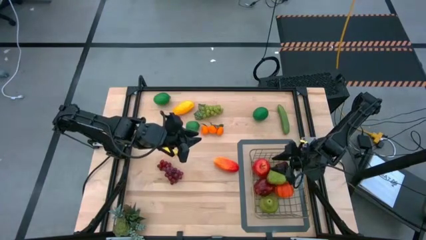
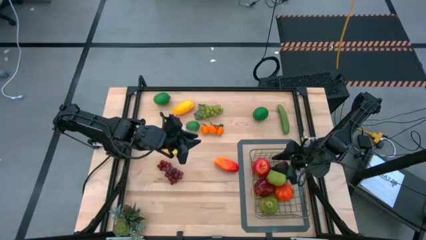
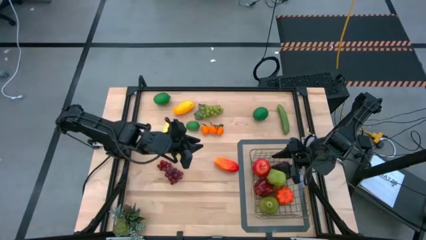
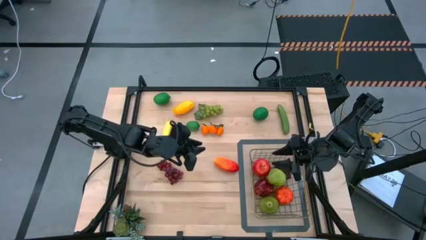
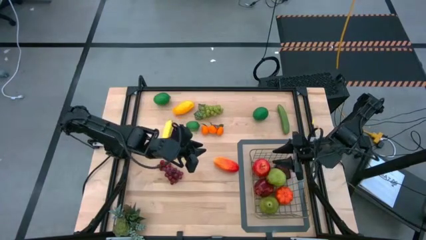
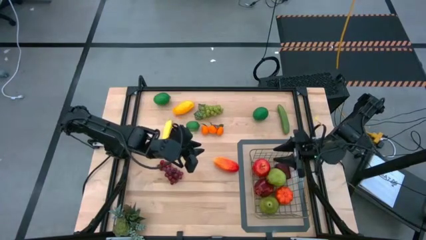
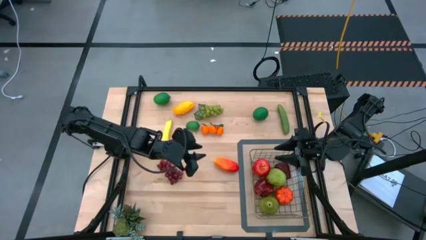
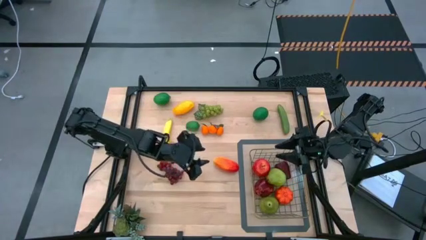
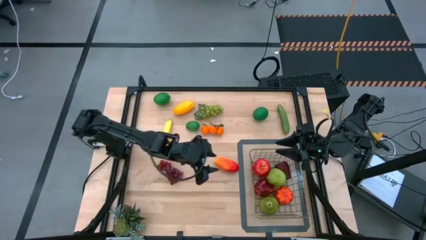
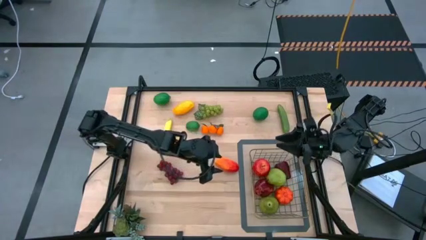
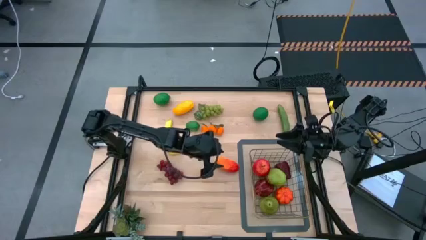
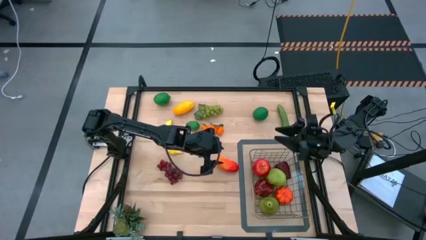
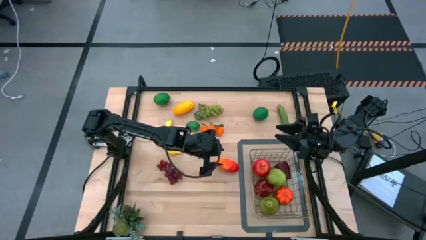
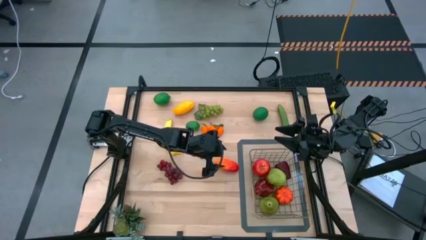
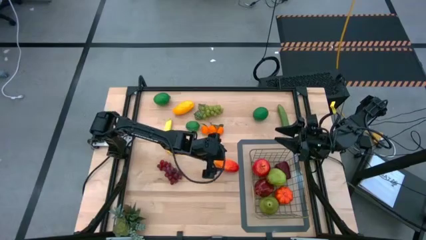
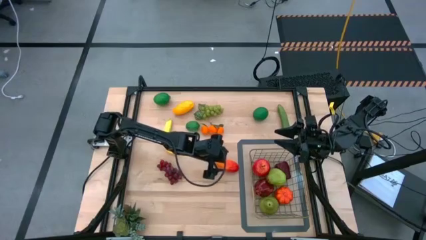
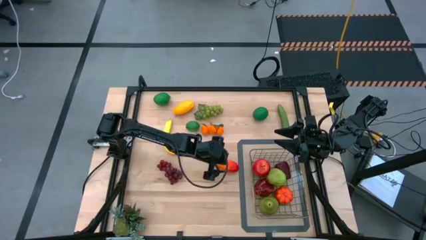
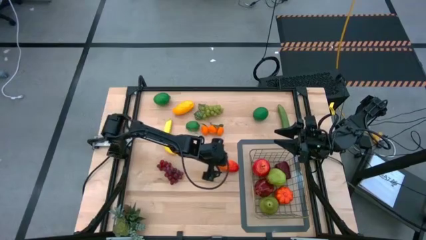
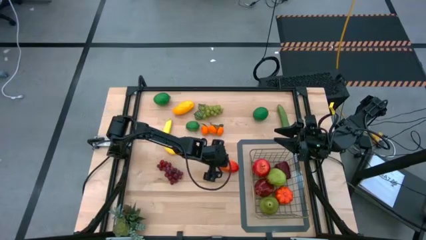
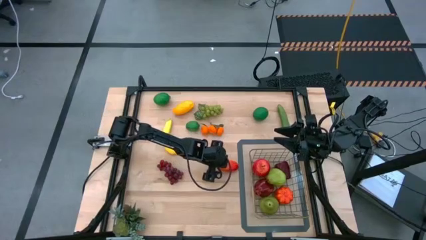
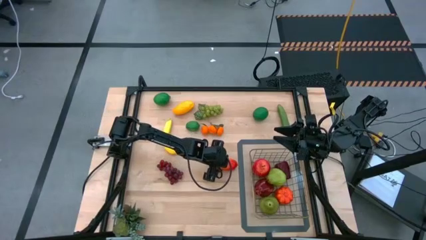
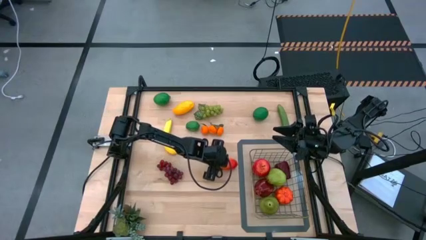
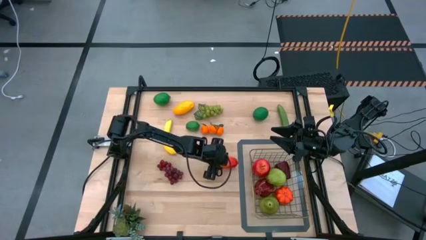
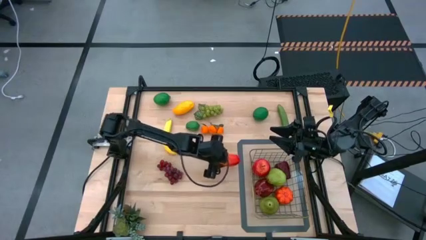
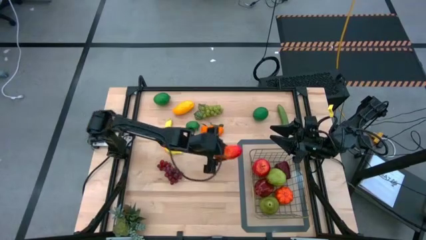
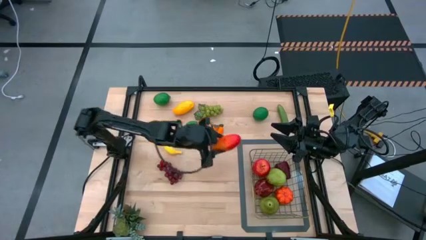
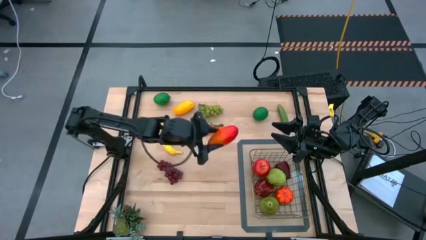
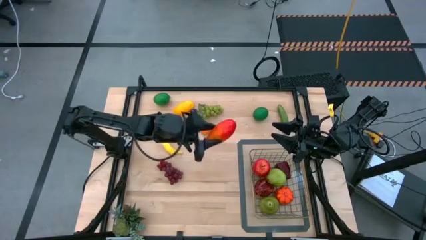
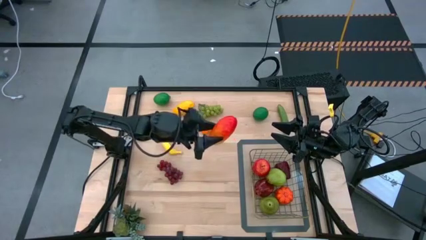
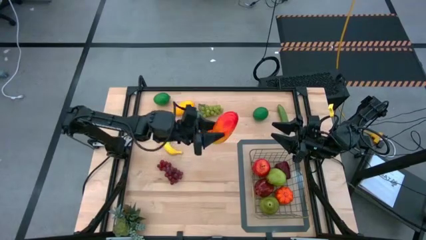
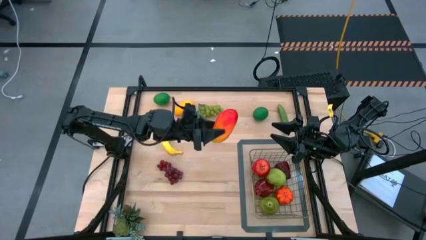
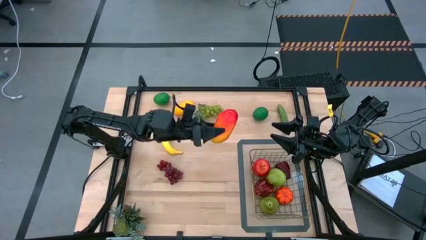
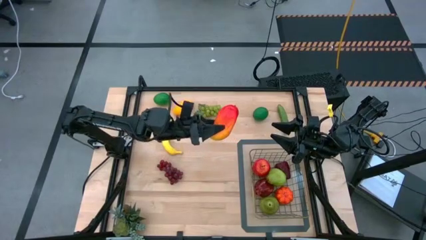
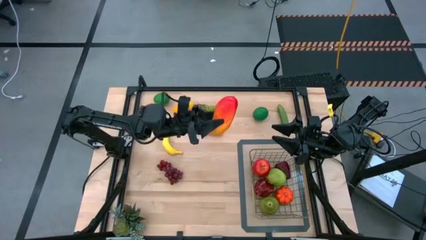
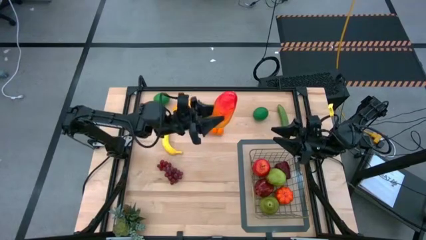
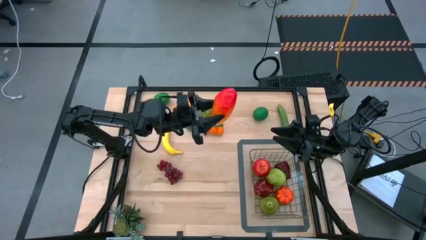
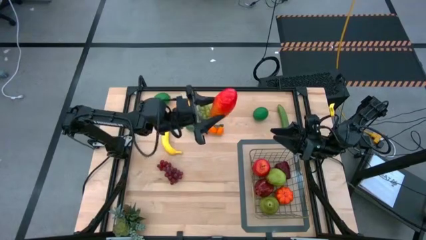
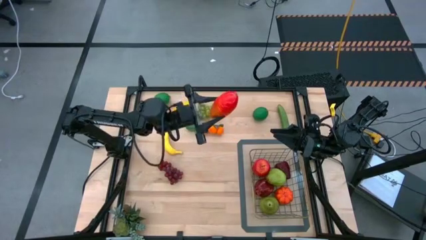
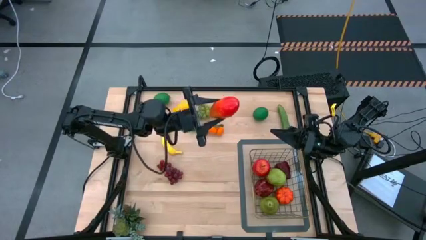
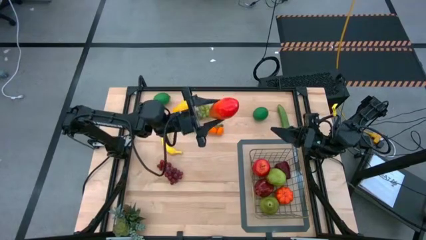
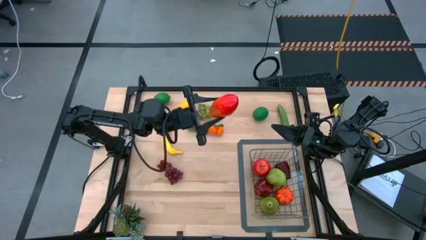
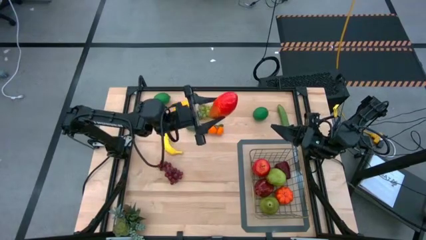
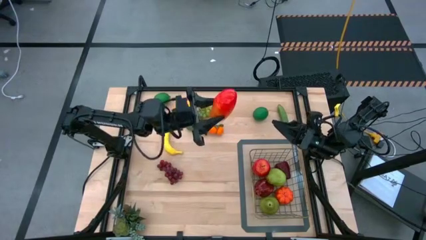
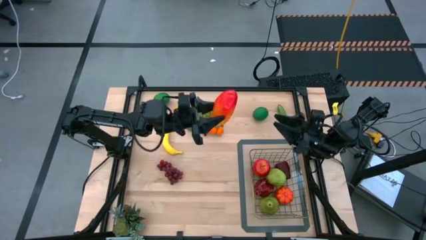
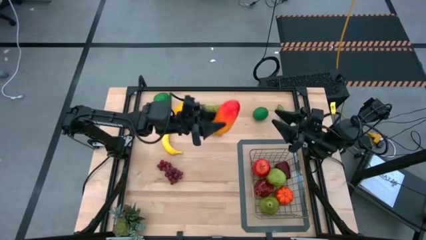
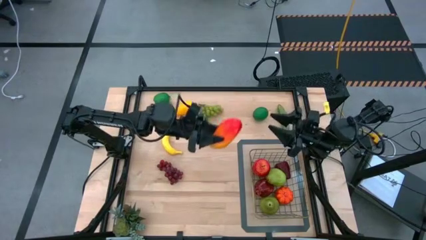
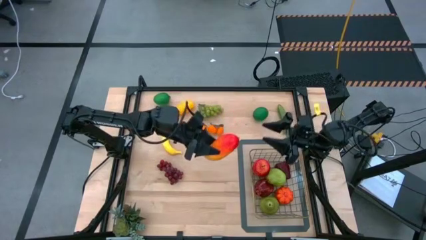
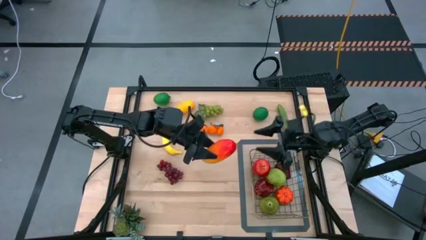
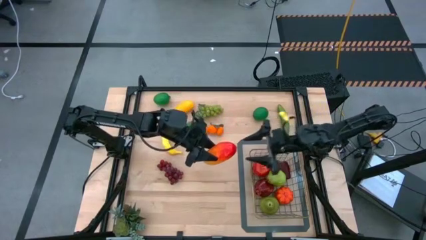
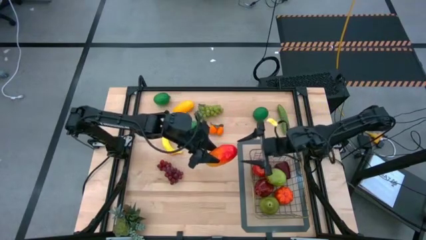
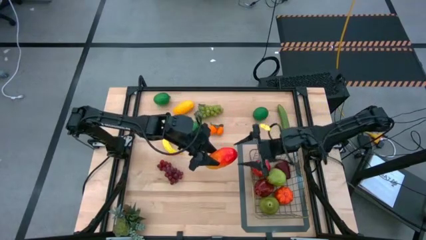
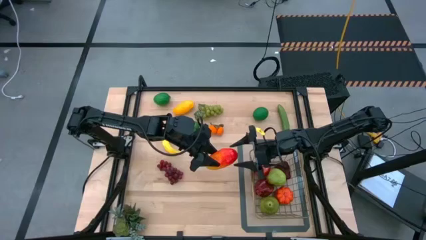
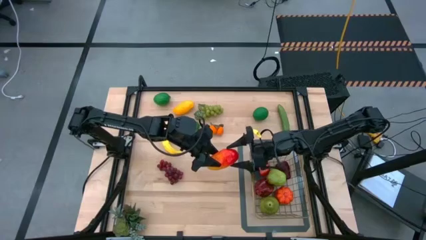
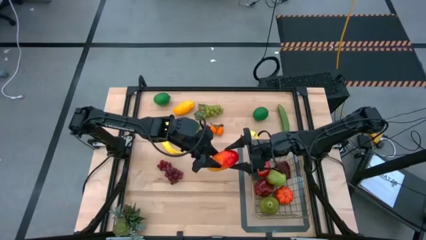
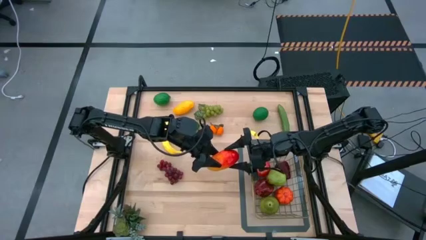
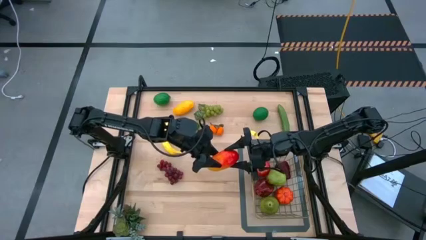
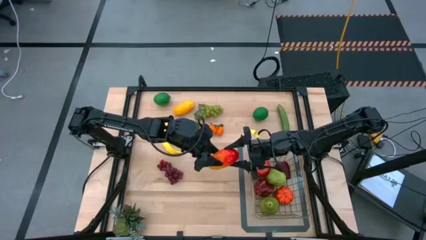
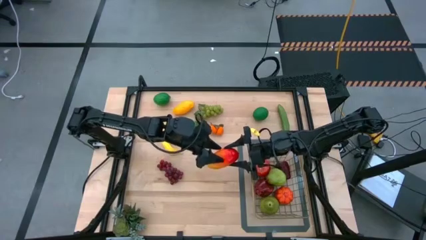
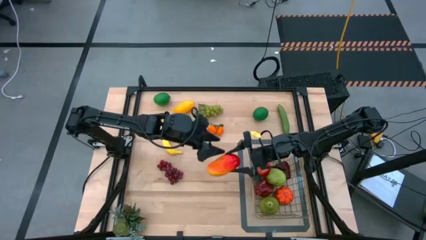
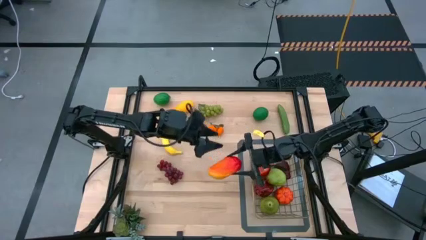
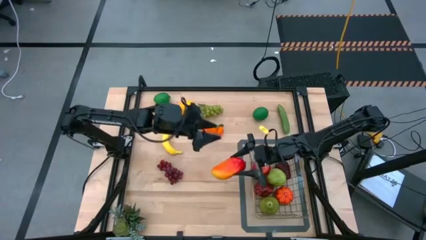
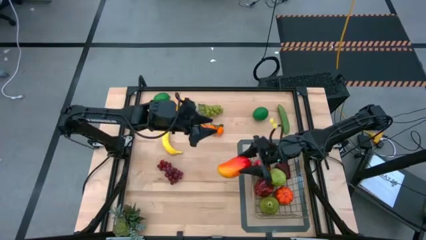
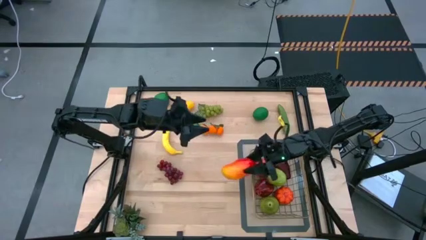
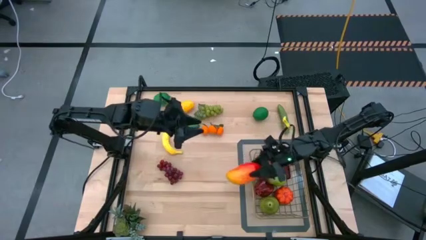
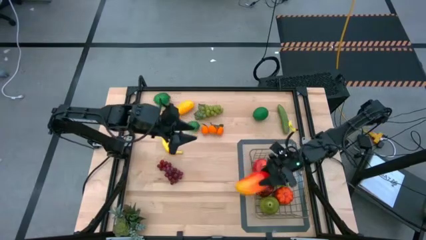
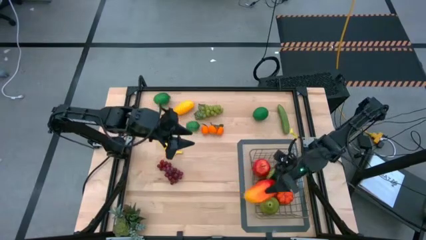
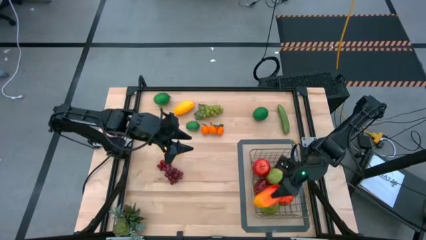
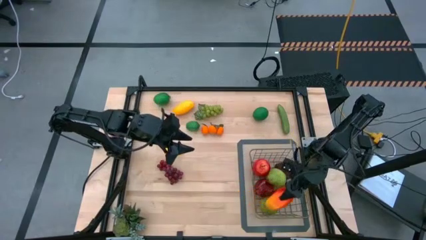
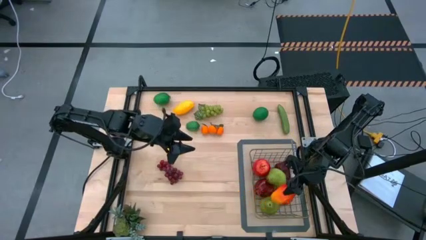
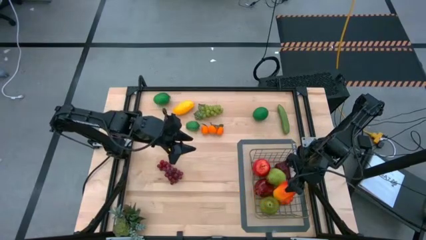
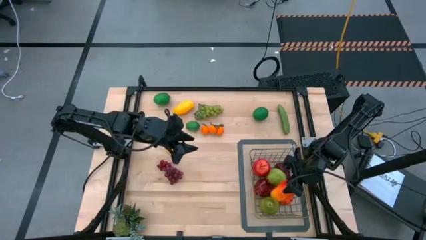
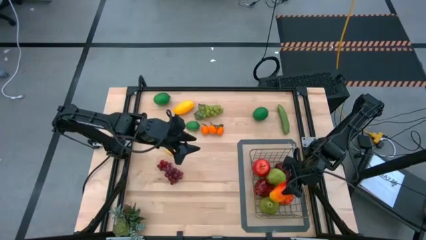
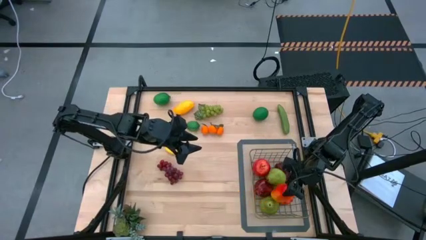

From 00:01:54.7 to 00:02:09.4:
Task: Build produce basket
Put the orange mango into the wire basket

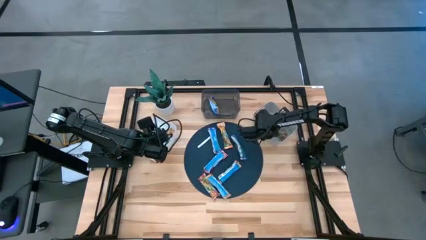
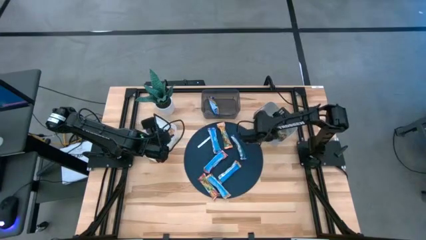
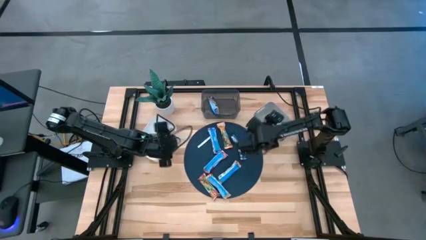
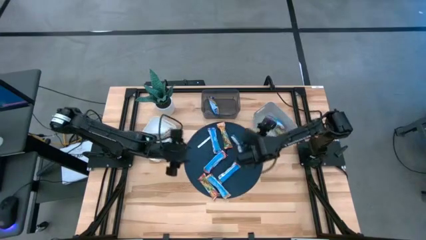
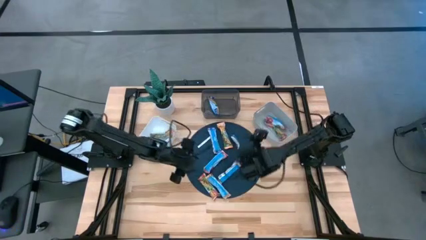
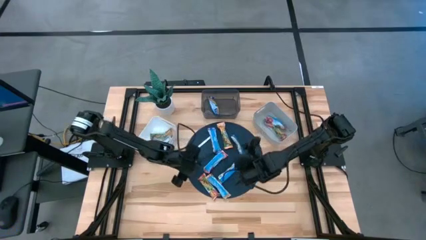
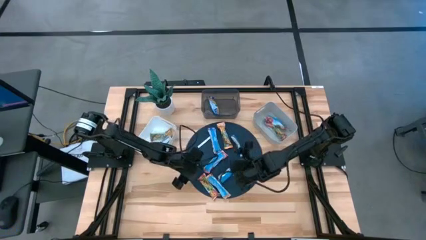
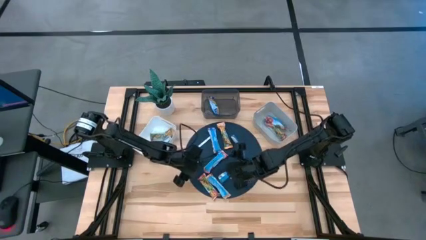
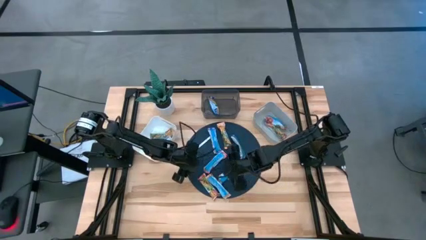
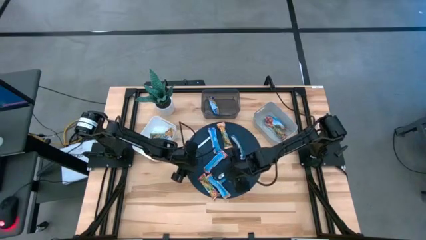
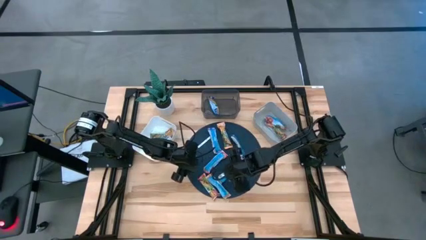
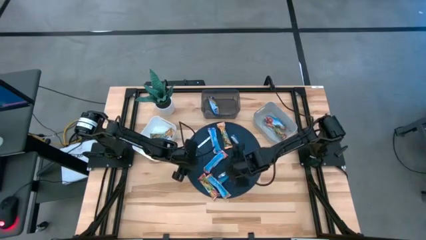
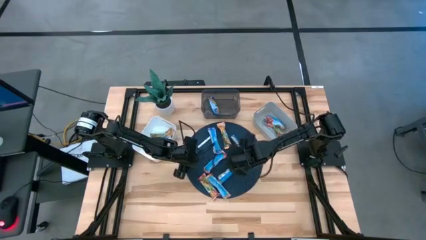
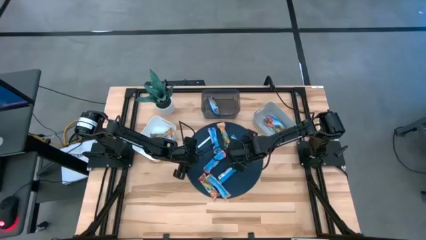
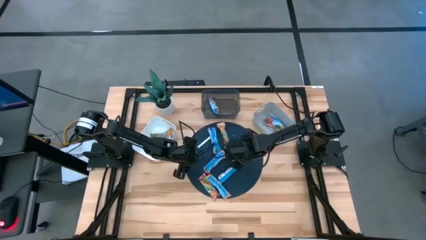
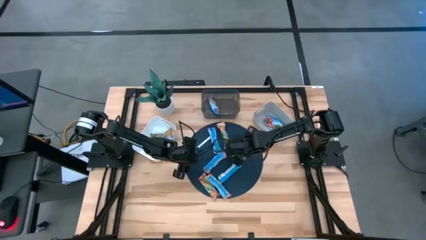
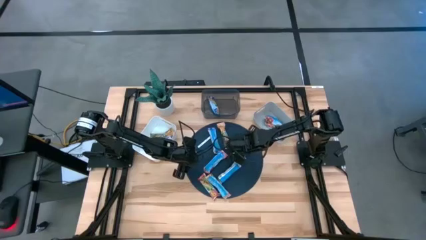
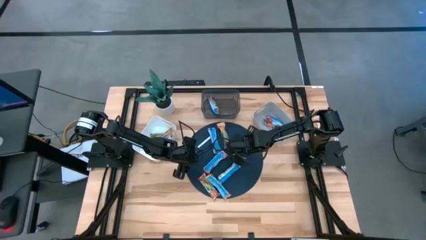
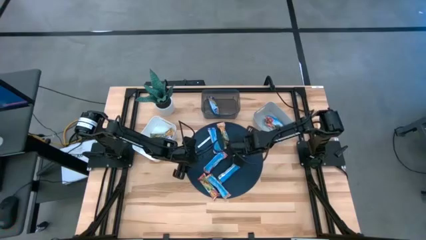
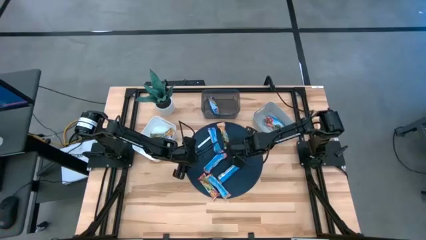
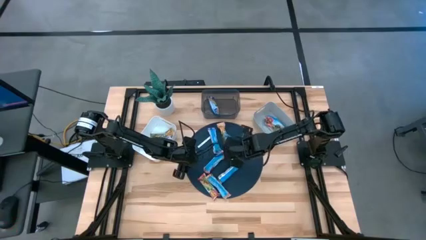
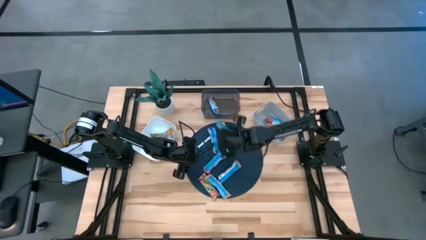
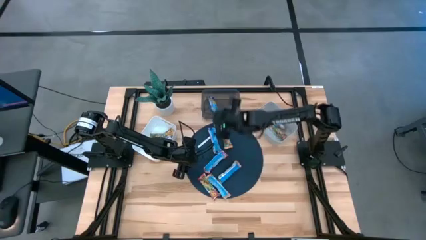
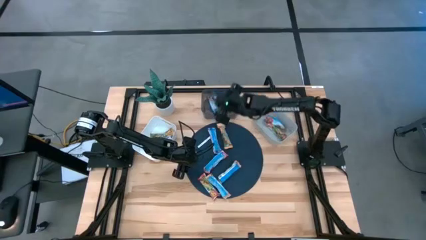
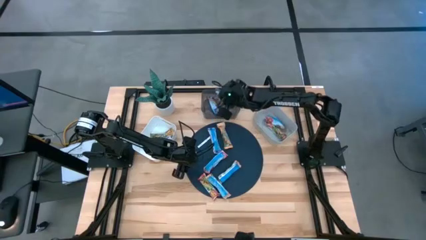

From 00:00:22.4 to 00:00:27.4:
Task: Pick and place Granola Bars by type
Put the blue granola bar into the black bin
